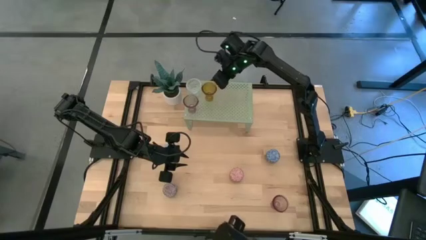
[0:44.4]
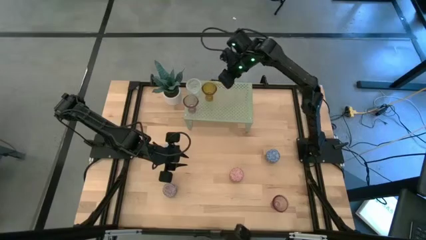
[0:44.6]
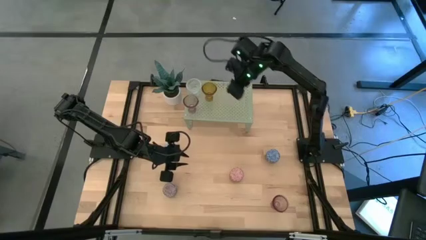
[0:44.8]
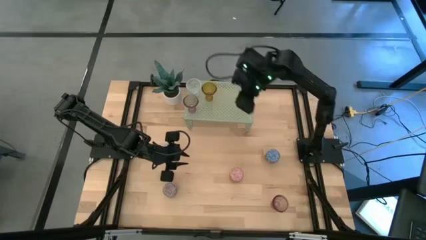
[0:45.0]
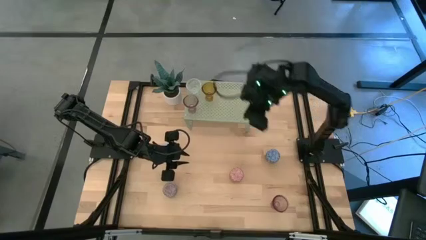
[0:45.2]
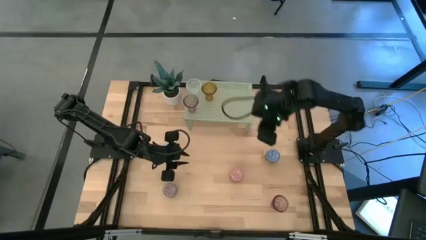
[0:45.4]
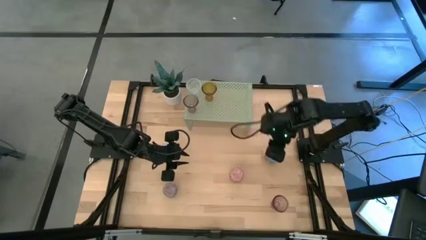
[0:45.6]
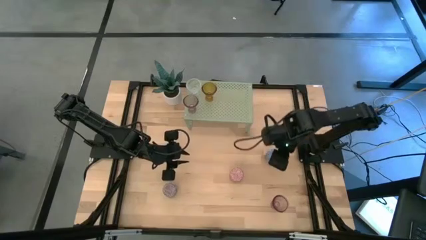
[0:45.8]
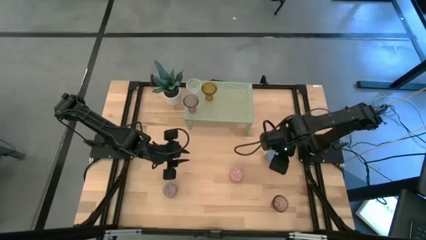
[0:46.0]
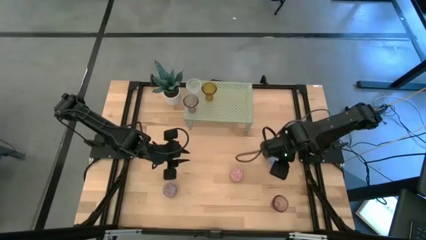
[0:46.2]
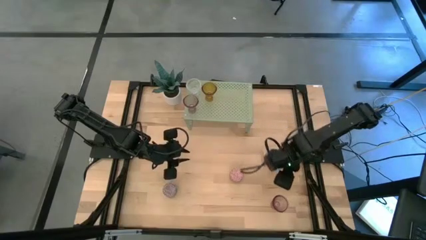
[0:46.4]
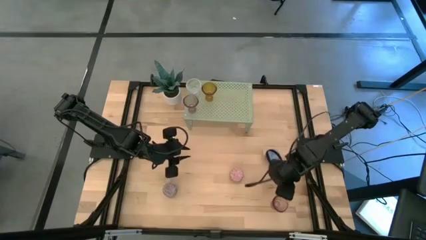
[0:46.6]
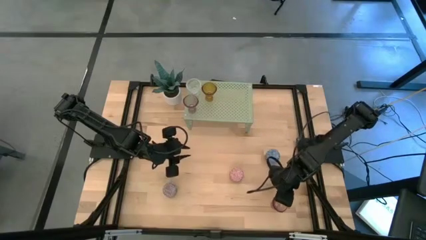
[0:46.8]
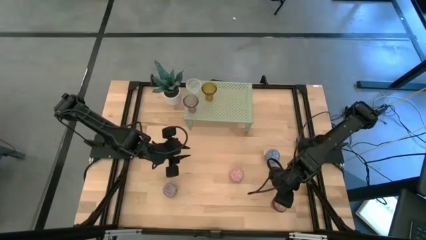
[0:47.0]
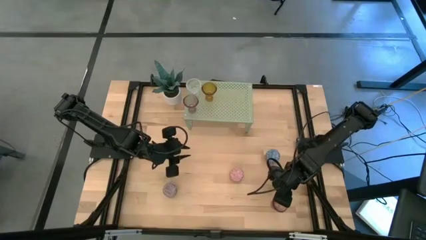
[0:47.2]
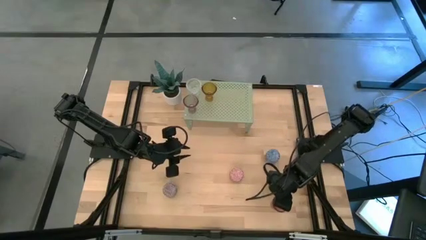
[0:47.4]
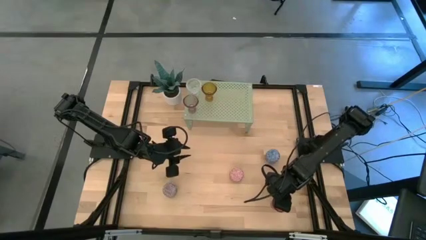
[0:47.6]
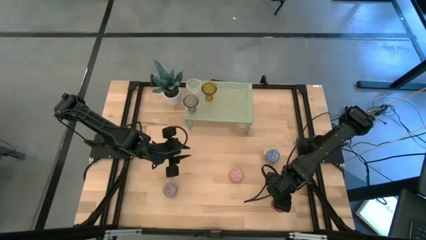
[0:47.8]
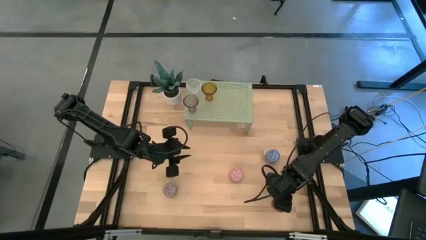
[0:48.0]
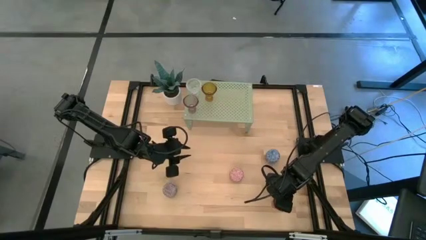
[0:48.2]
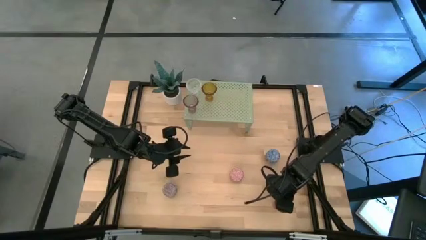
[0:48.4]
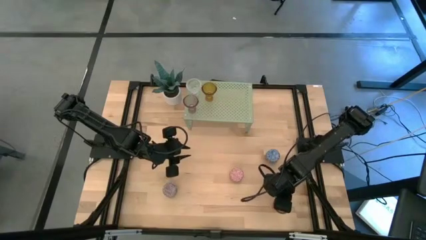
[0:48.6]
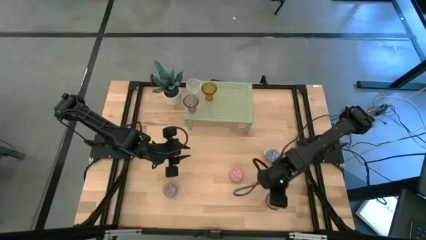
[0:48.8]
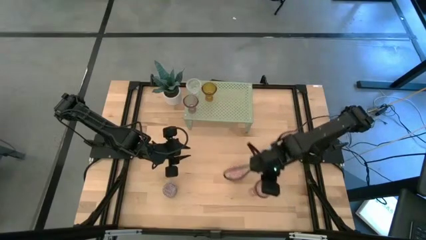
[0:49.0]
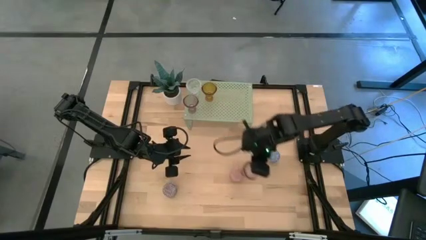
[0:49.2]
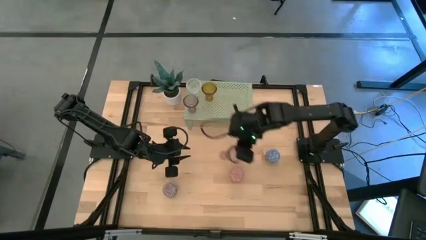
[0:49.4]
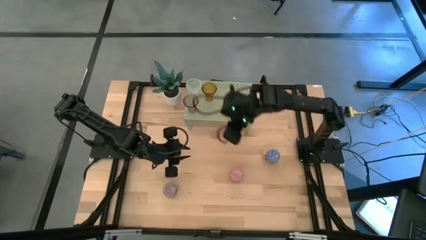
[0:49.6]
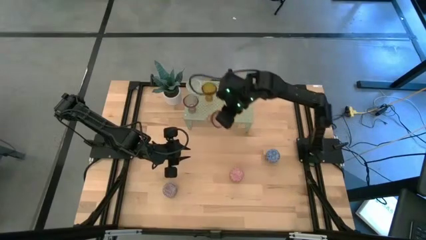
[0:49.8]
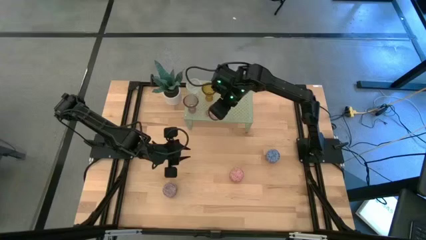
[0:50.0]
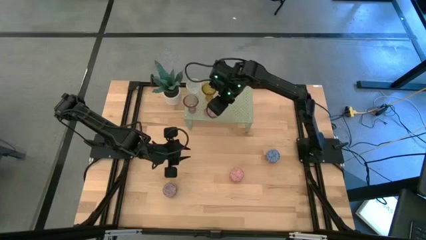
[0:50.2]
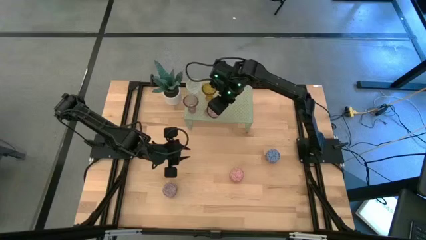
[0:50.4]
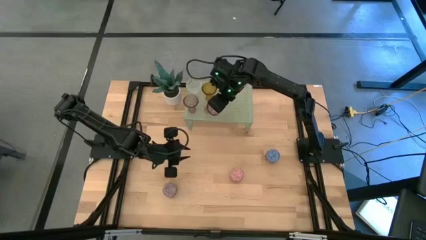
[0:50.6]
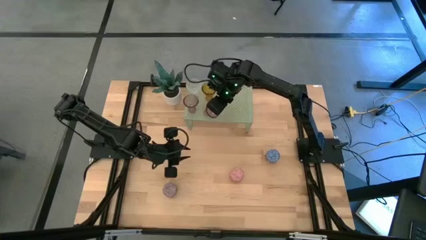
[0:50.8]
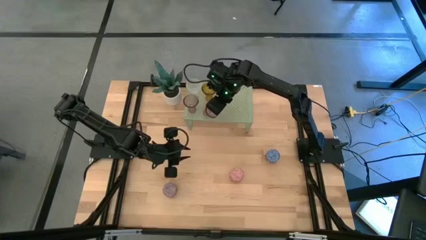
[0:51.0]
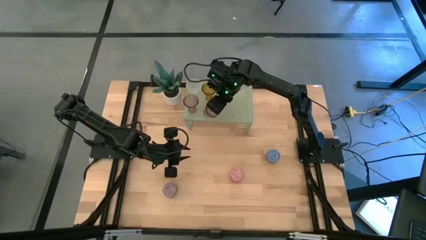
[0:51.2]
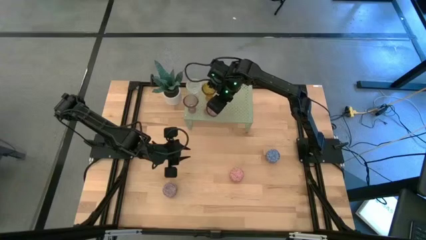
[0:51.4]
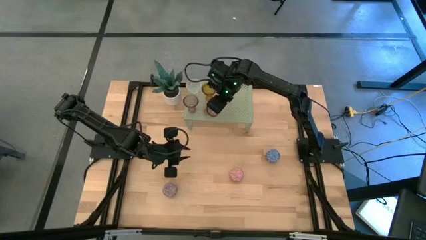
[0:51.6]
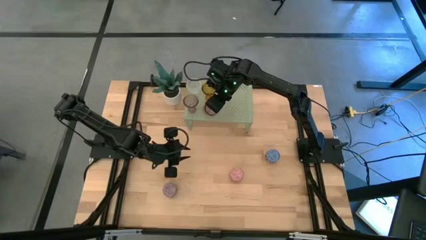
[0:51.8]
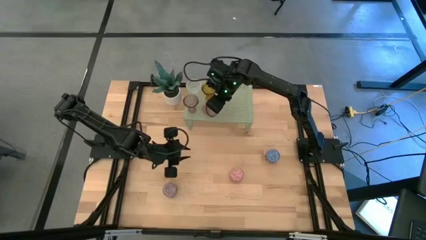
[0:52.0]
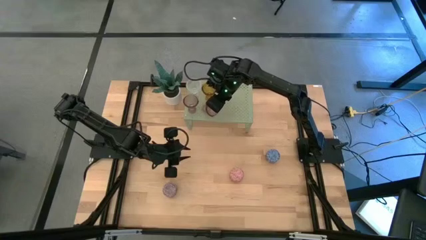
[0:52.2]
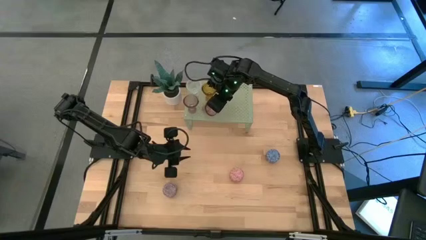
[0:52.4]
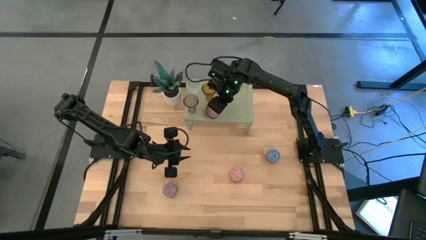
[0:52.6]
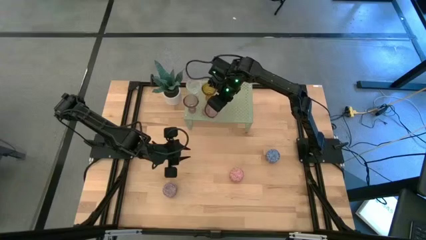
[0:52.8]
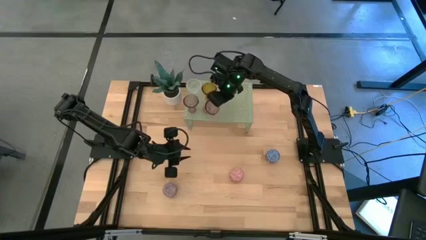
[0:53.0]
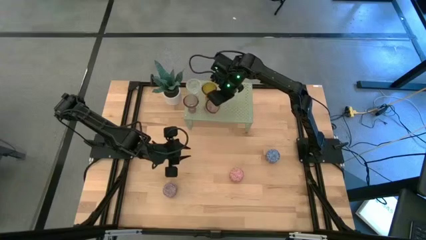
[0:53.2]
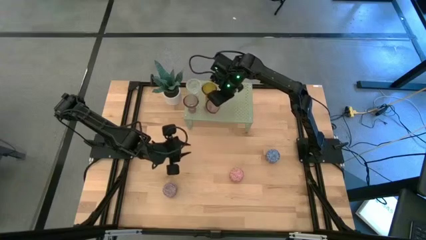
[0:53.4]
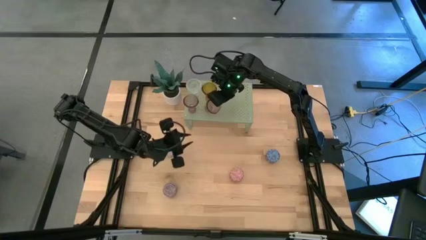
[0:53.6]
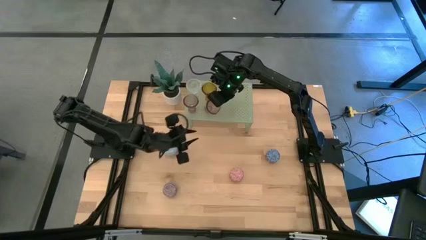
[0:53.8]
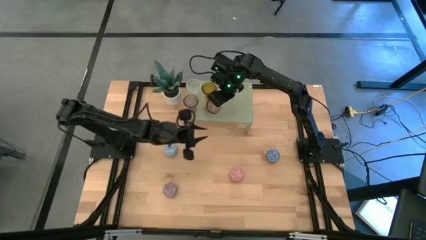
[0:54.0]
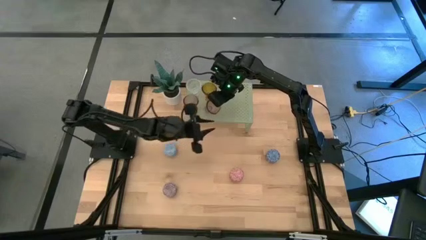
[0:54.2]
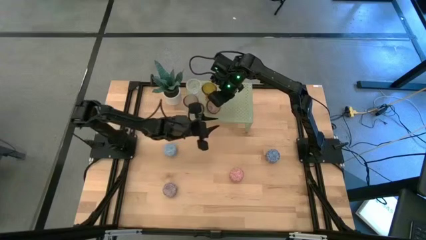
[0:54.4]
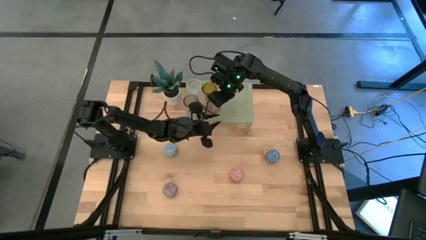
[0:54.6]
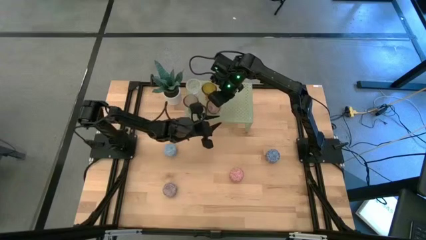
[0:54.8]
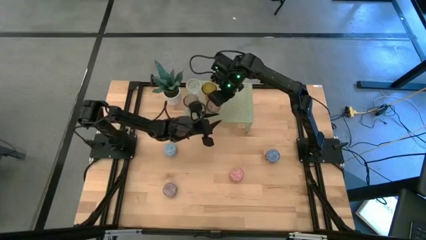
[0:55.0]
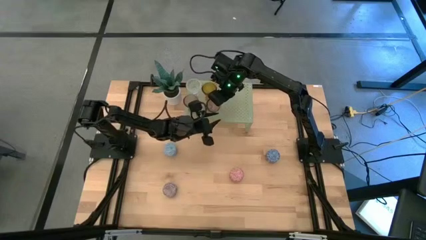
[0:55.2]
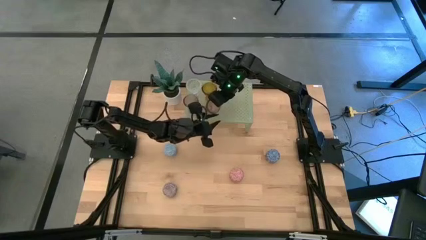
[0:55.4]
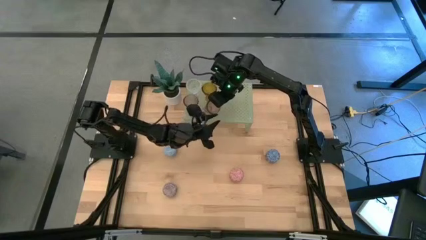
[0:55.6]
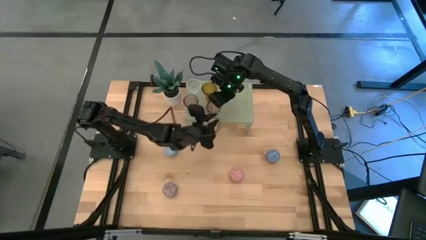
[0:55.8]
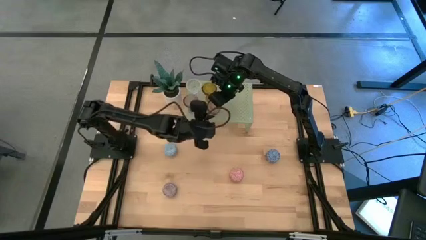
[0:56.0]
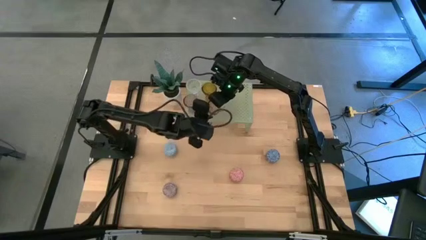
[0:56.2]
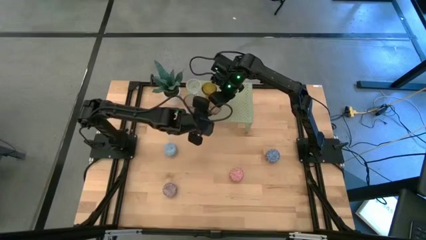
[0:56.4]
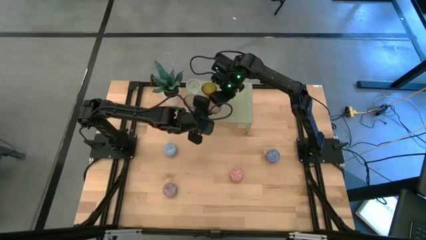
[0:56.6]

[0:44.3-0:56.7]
Task: Pick & Place candle stick holders
Put the pink glass candle holder on the shelf

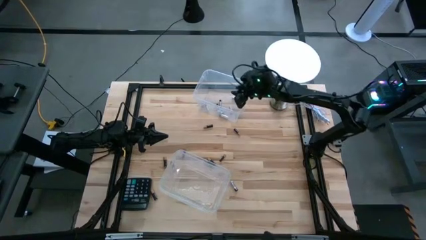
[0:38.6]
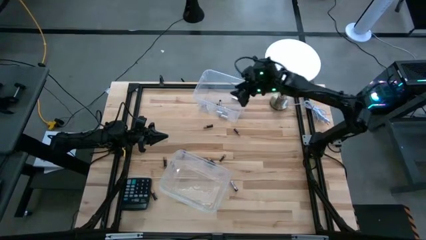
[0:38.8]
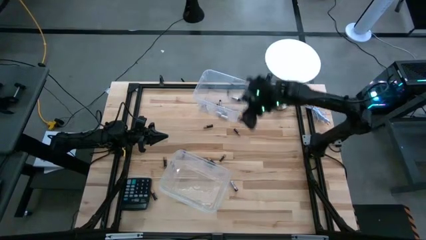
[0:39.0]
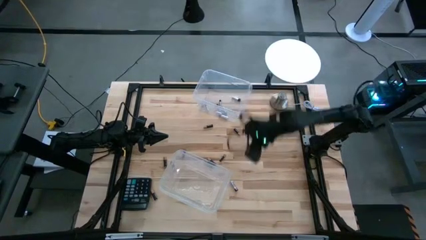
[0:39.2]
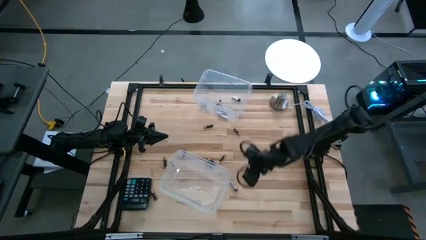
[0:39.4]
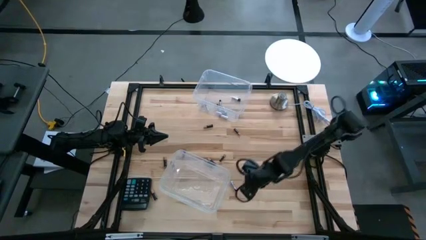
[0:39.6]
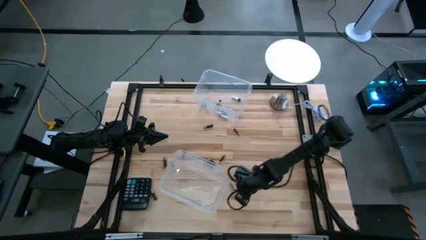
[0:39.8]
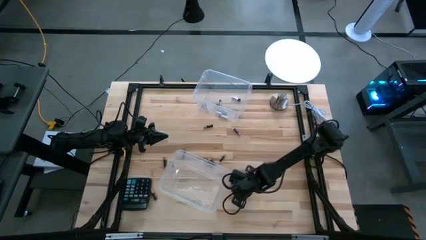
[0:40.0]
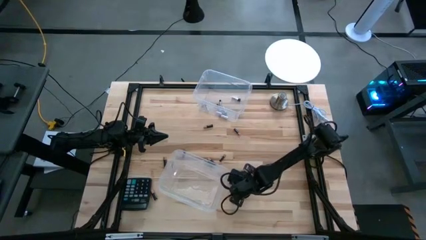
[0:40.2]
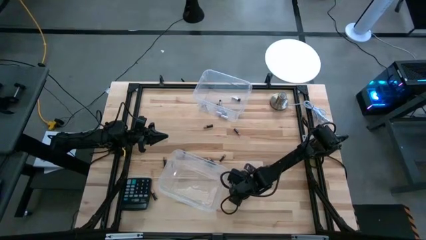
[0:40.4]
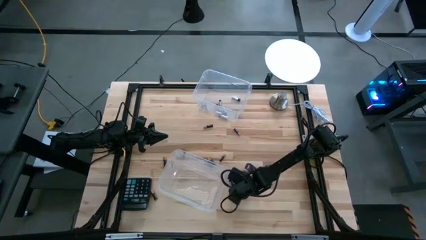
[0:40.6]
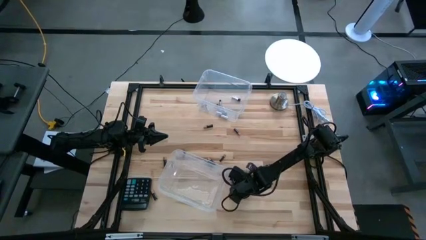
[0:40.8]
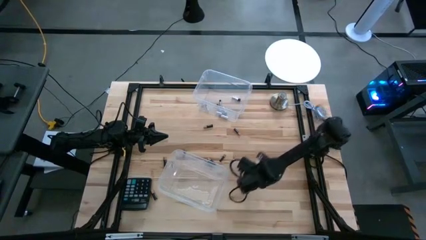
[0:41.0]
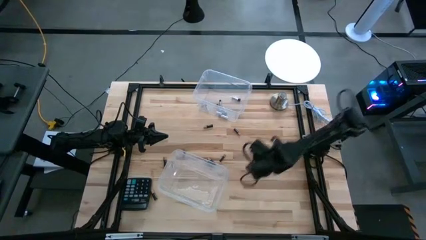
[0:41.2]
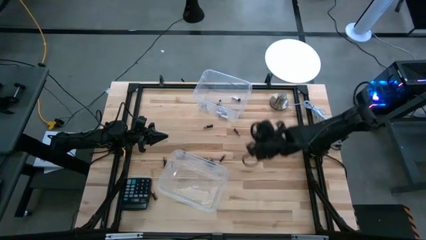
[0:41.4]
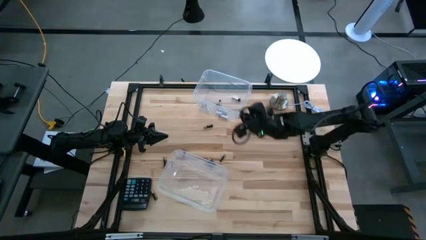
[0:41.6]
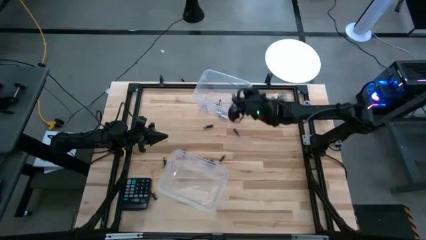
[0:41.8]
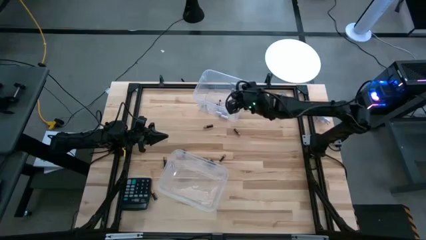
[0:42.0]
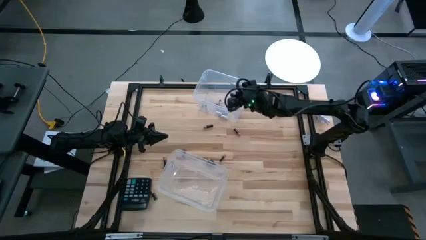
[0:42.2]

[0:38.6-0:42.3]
Task: Sort batteries
Put the silver battery into the top transparent bin
